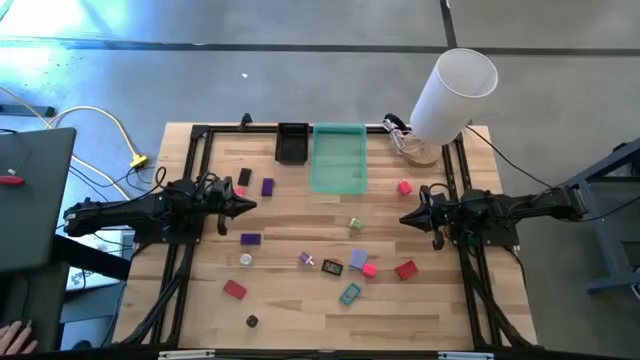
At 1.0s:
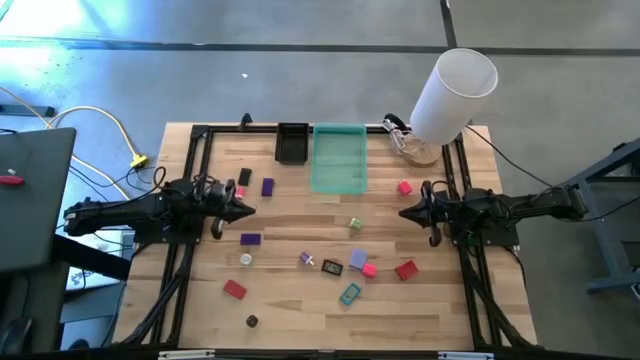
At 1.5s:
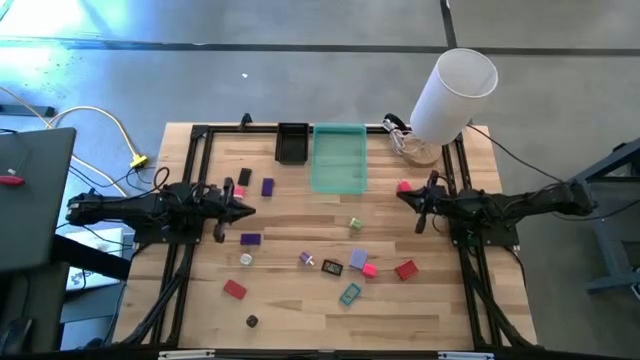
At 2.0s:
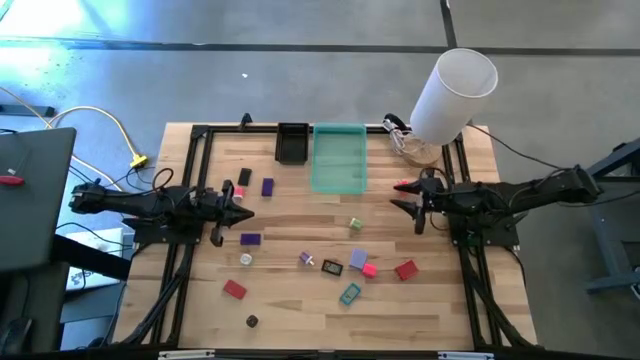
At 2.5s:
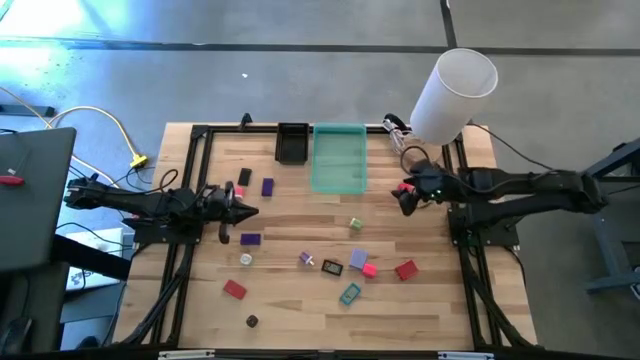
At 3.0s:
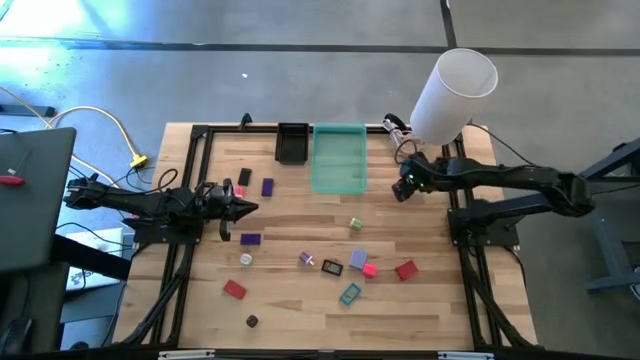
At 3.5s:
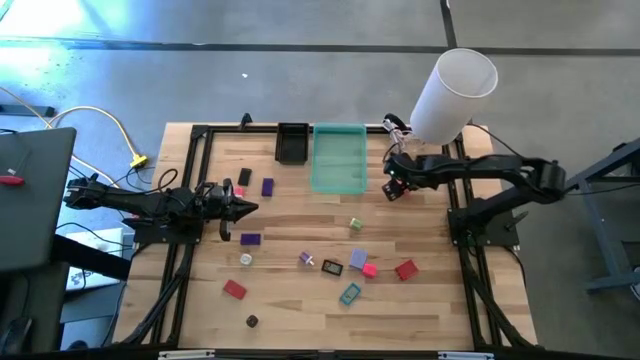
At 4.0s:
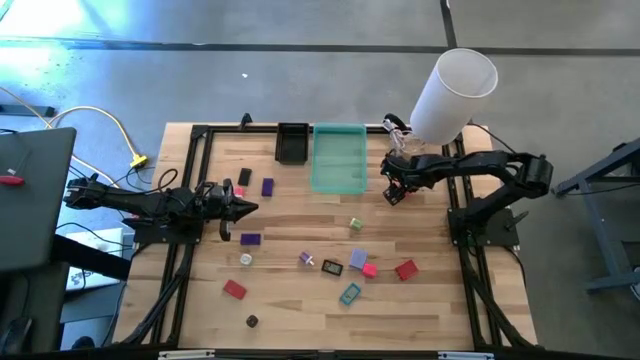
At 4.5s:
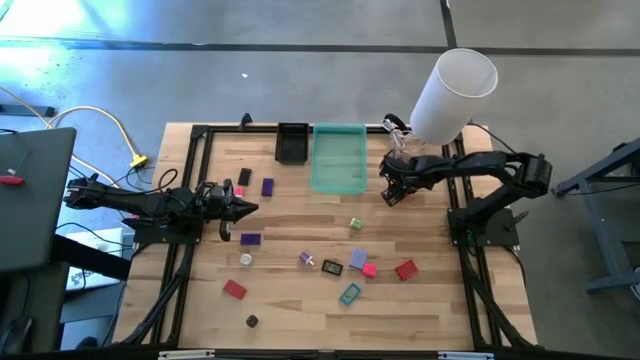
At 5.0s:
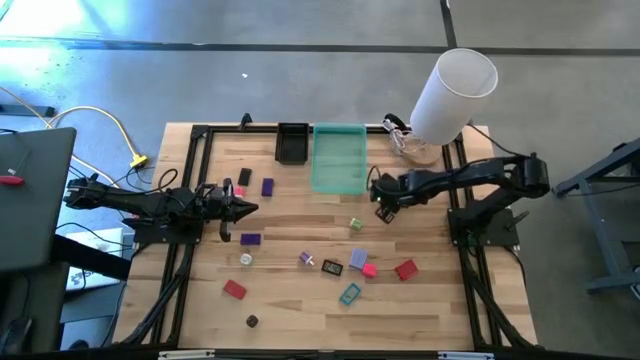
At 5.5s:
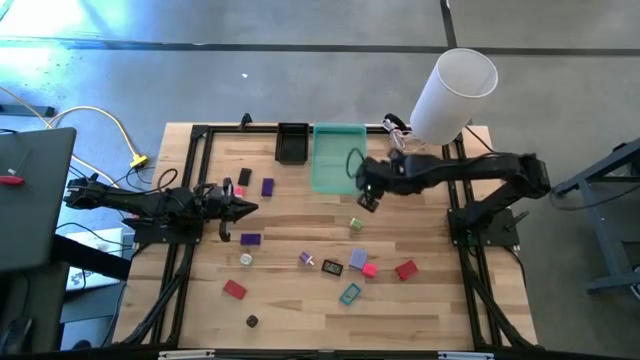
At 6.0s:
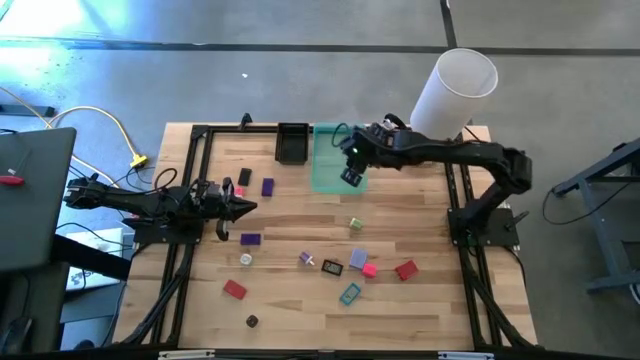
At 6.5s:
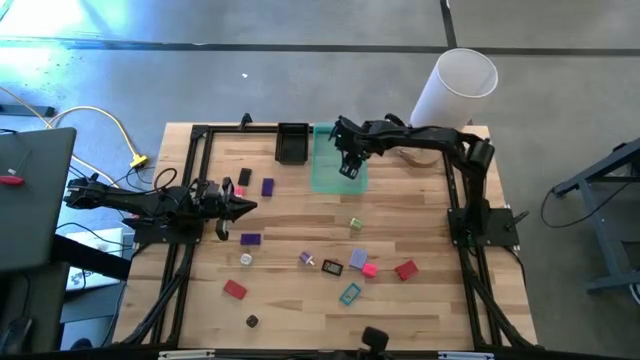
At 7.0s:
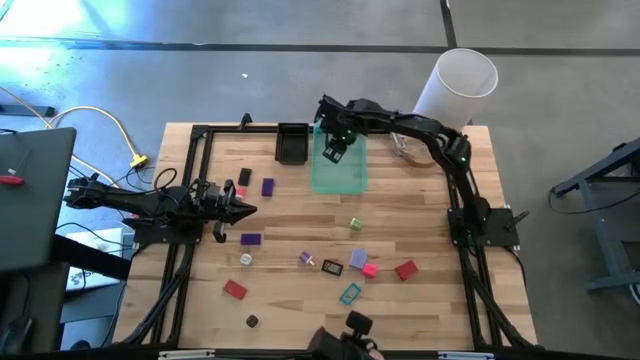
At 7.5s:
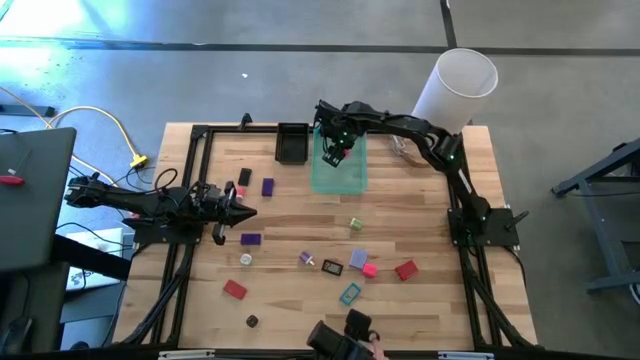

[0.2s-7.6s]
Task: Pick & Place Office items
Put the top pink charger adapter into the green bin

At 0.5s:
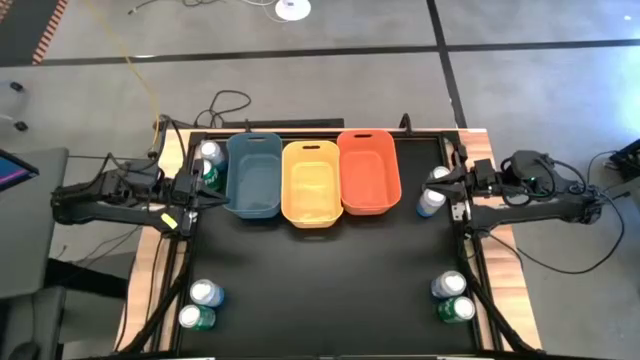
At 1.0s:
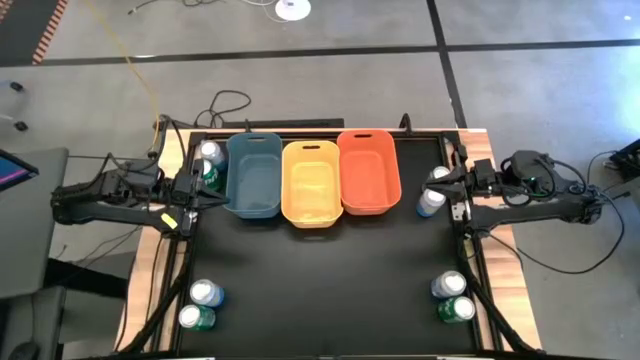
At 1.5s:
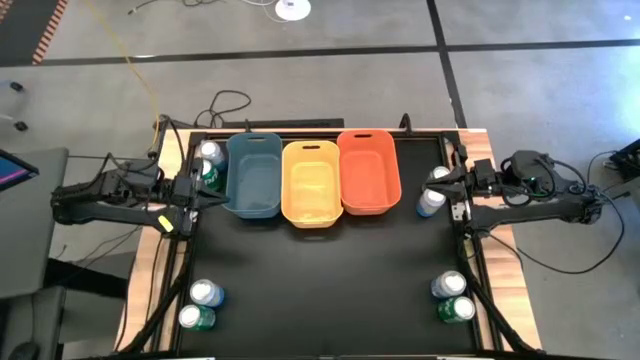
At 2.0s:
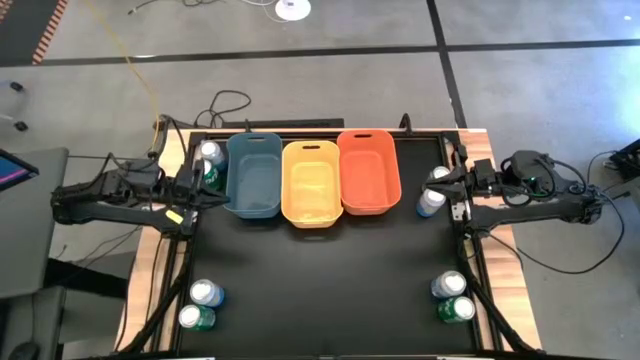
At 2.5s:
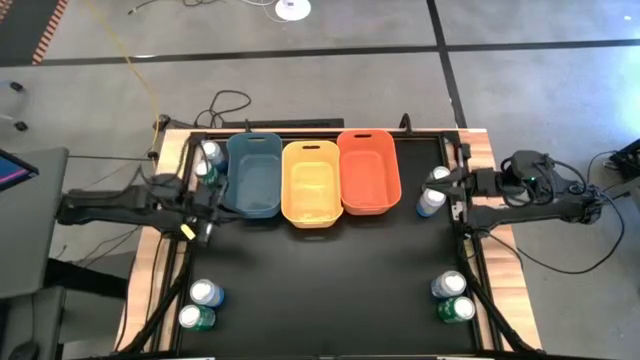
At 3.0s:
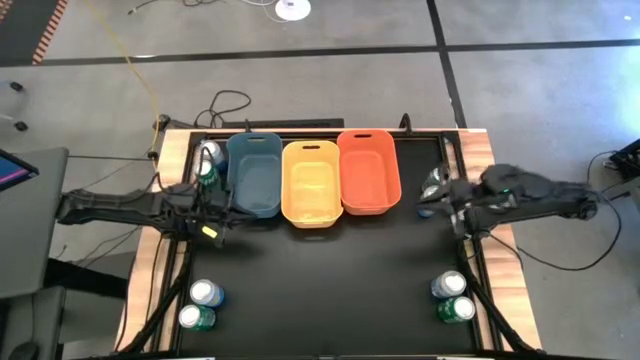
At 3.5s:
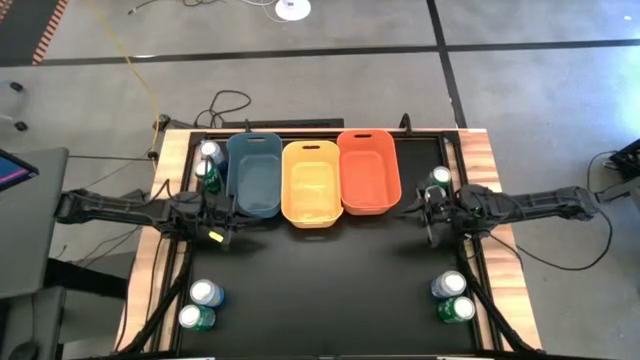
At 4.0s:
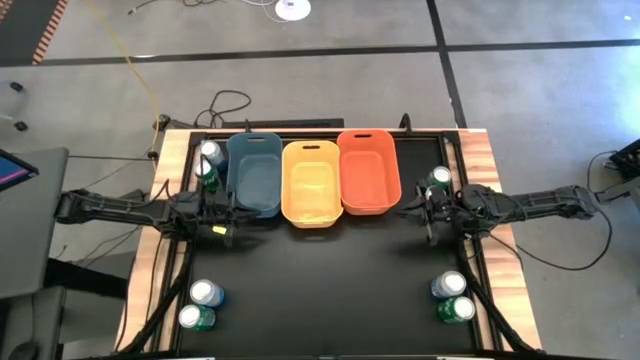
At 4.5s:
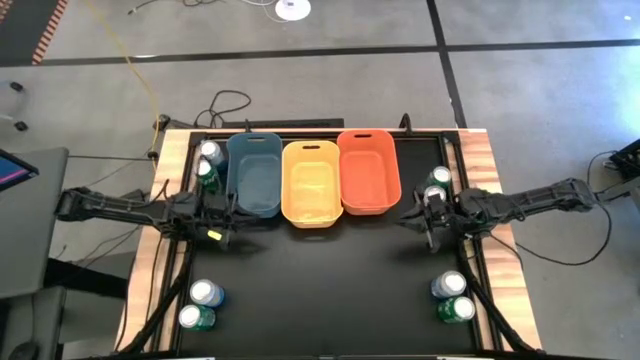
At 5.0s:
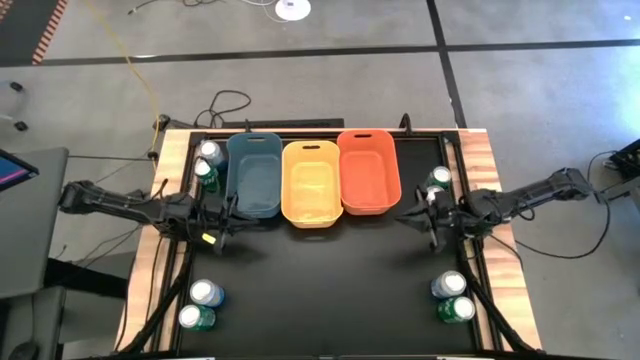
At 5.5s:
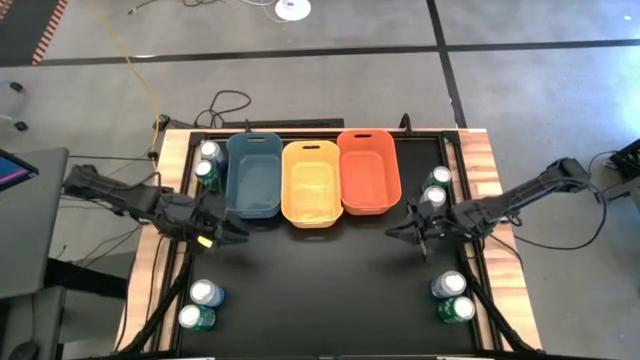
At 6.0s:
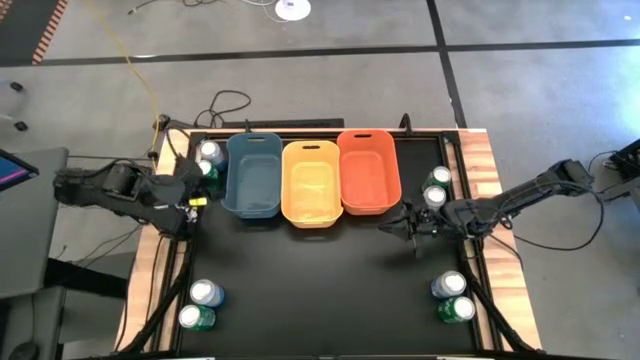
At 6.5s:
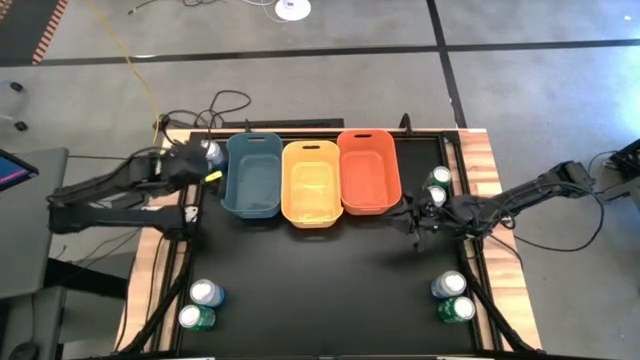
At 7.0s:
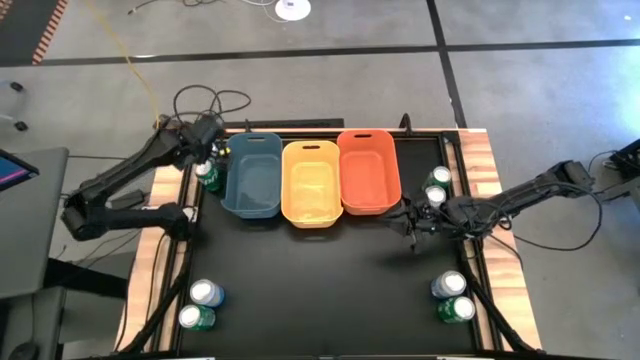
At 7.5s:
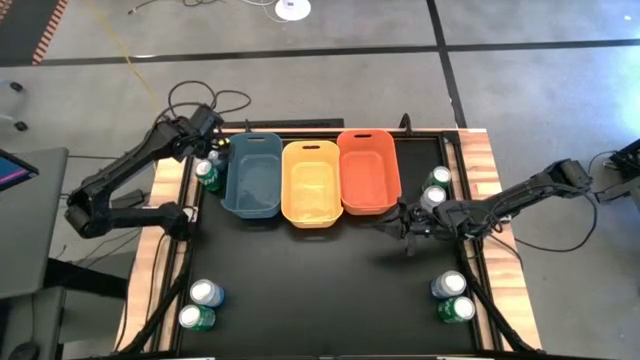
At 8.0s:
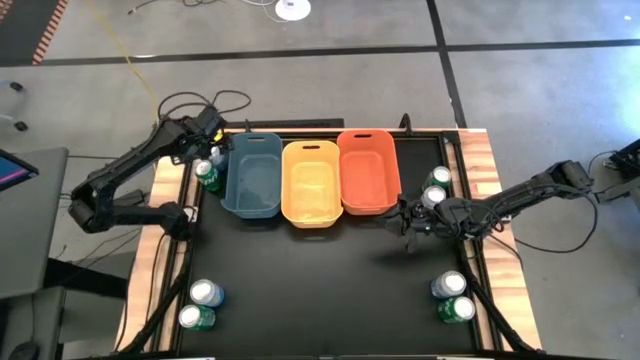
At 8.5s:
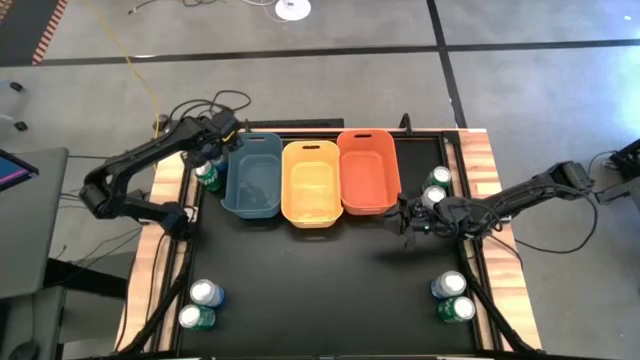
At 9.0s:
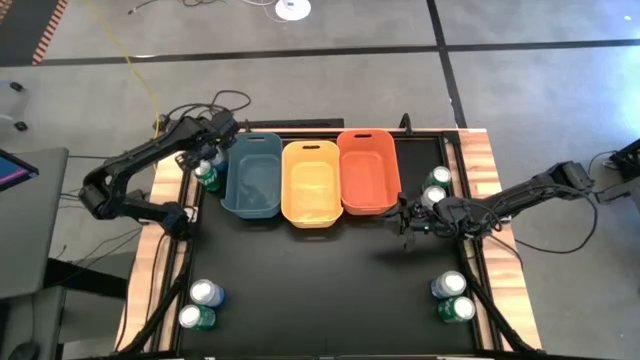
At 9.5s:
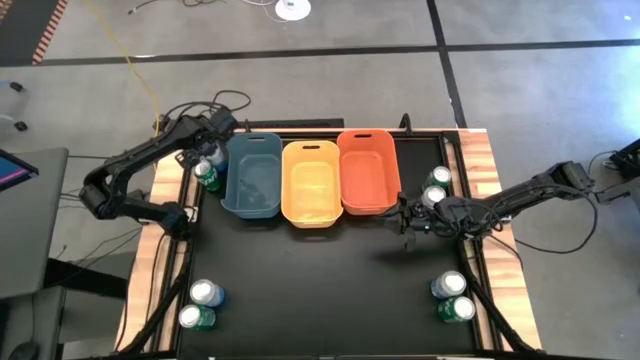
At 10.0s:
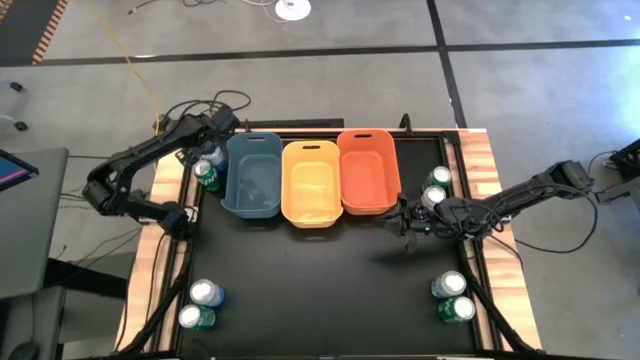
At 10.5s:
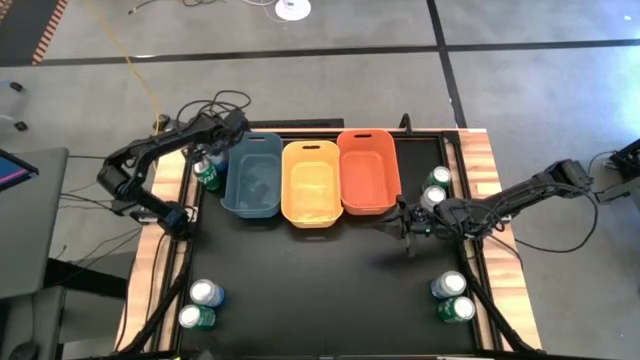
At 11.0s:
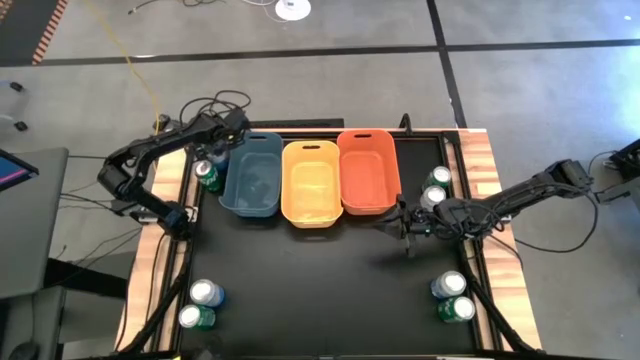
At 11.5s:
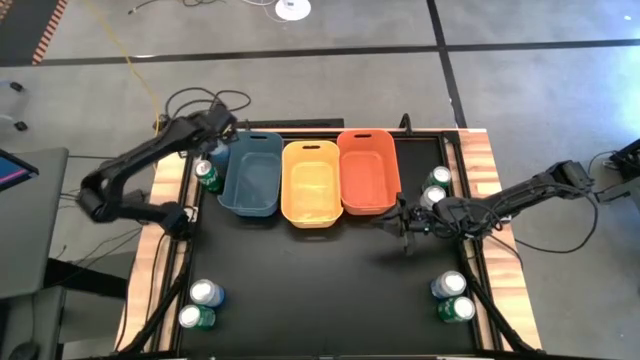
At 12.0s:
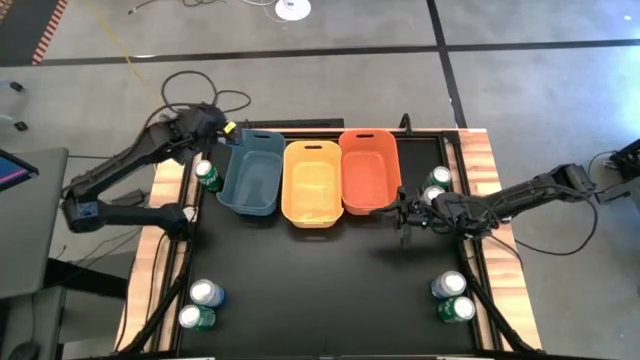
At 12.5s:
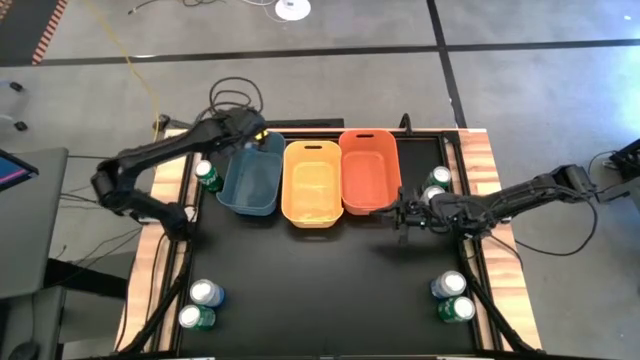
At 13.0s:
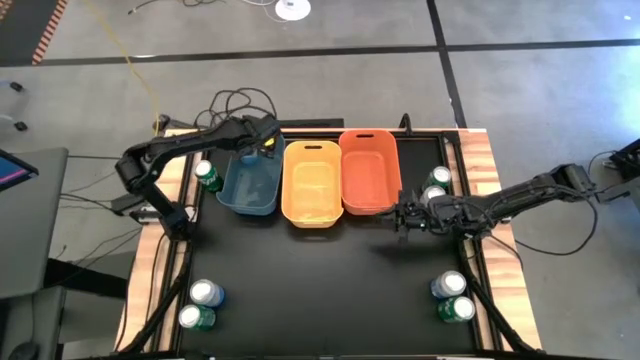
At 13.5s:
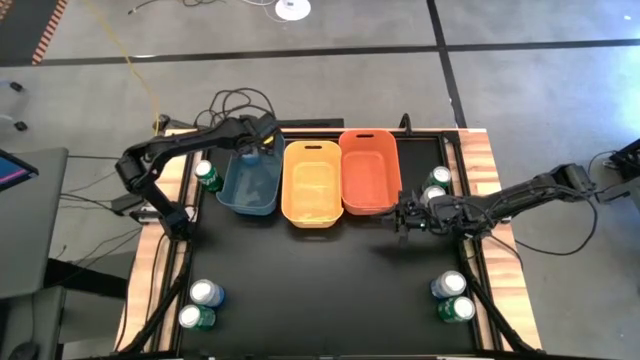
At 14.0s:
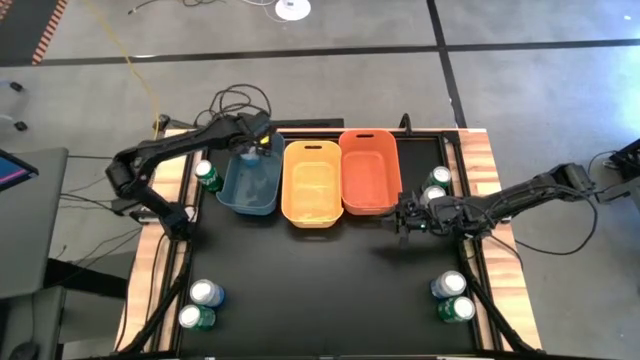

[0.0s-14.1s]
Task: Sort soda cans
Put the blue/white soda can into the blue bin
